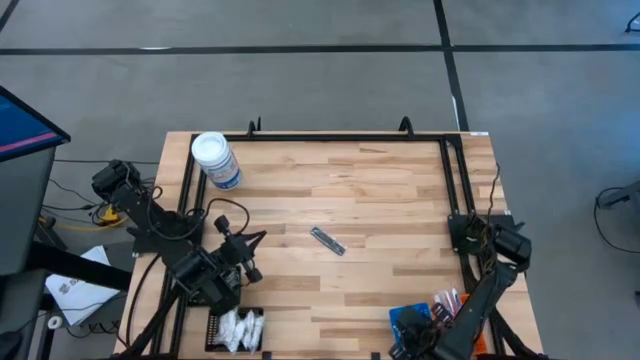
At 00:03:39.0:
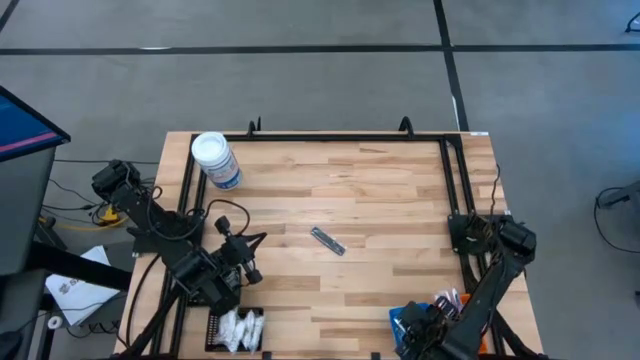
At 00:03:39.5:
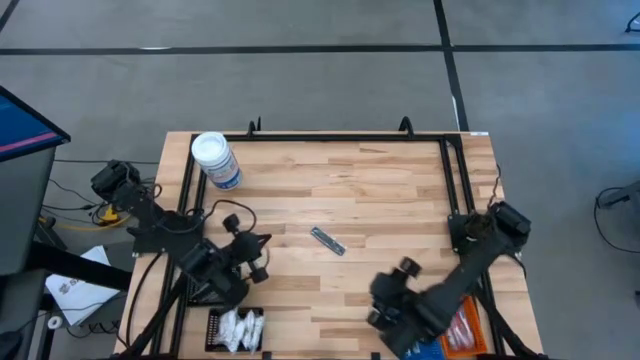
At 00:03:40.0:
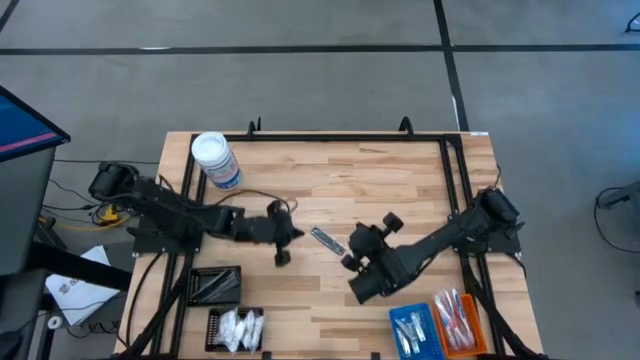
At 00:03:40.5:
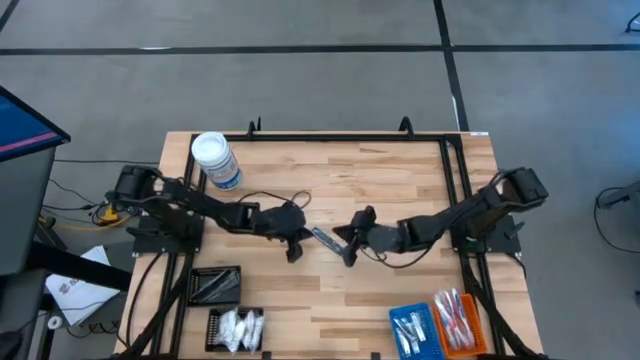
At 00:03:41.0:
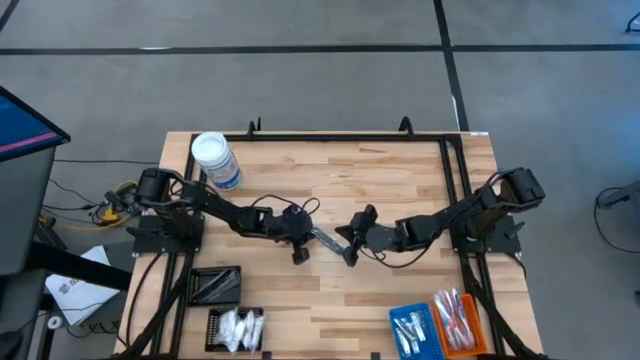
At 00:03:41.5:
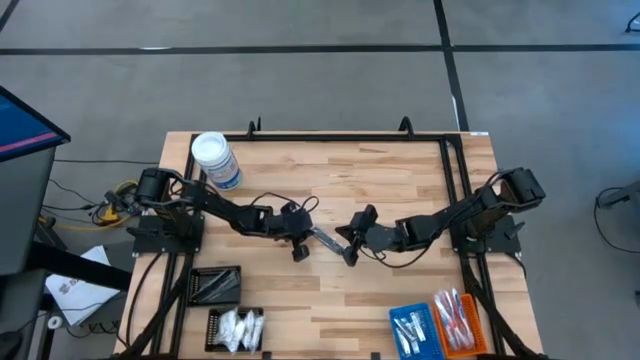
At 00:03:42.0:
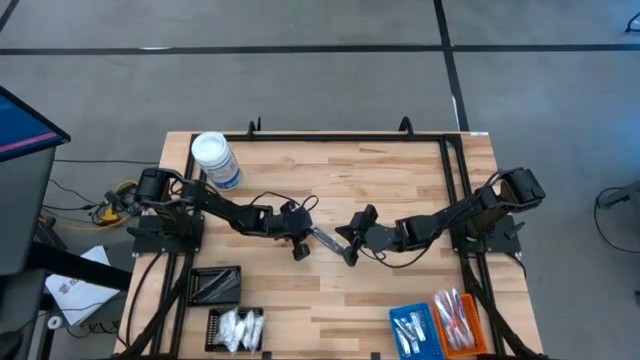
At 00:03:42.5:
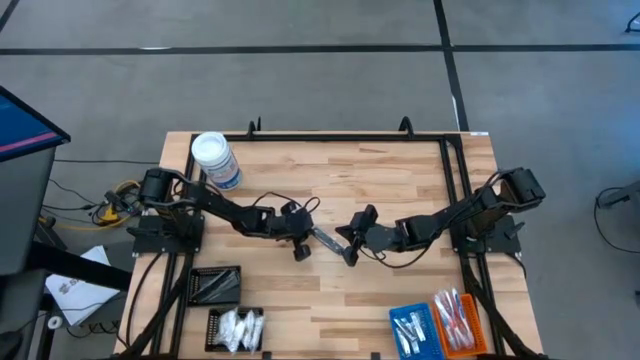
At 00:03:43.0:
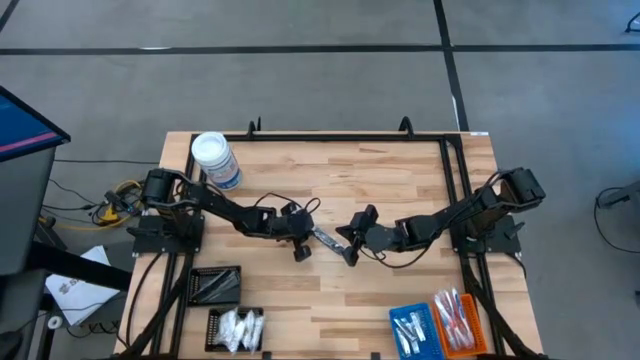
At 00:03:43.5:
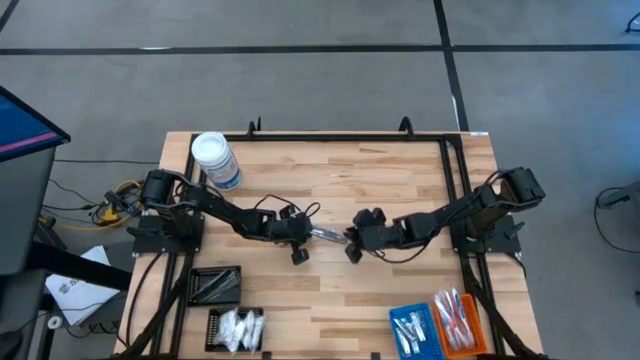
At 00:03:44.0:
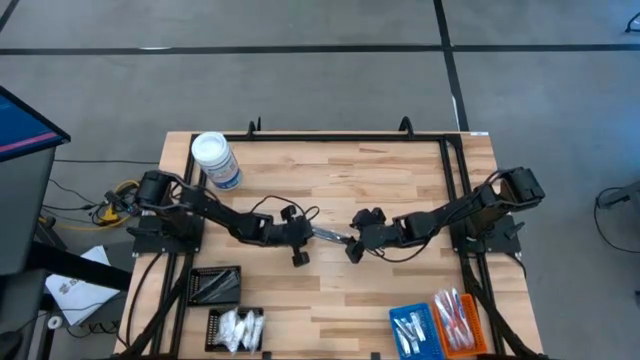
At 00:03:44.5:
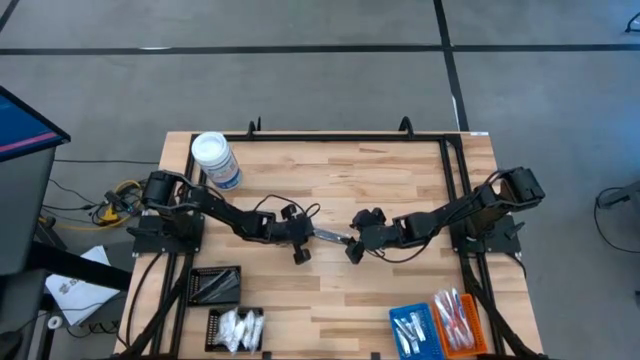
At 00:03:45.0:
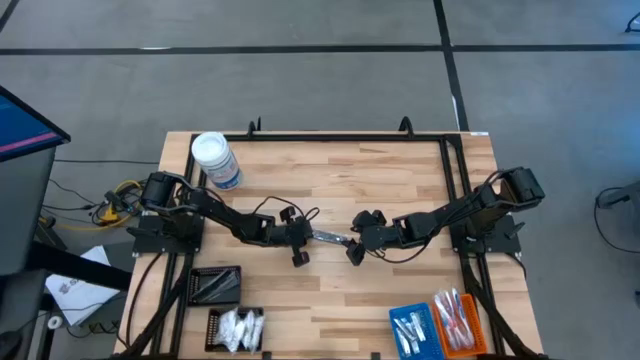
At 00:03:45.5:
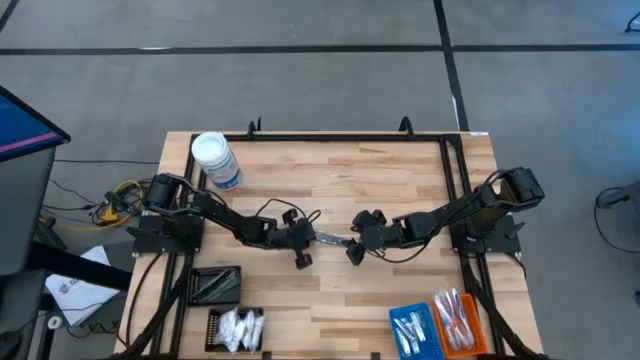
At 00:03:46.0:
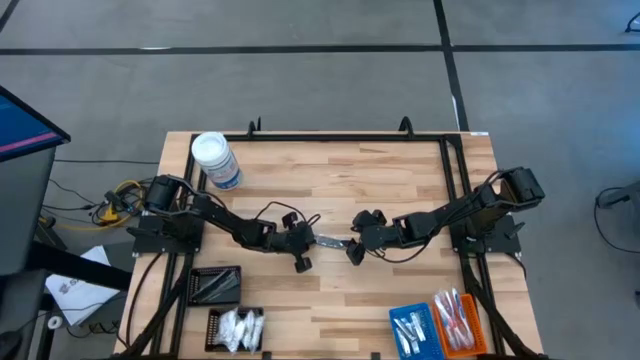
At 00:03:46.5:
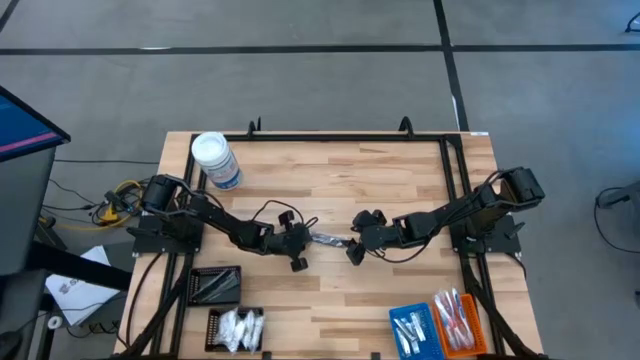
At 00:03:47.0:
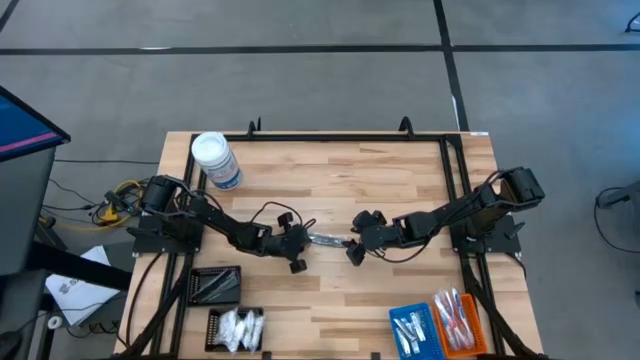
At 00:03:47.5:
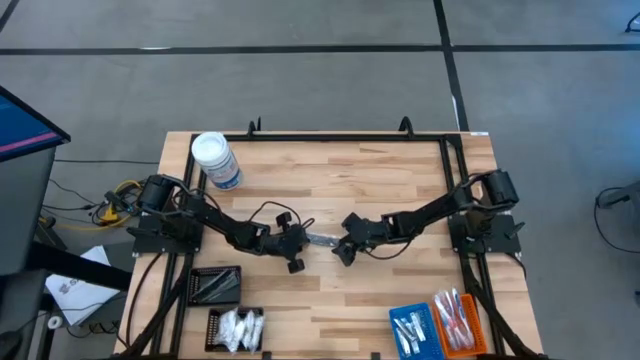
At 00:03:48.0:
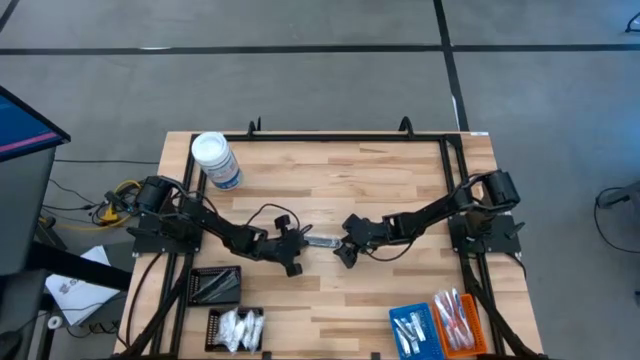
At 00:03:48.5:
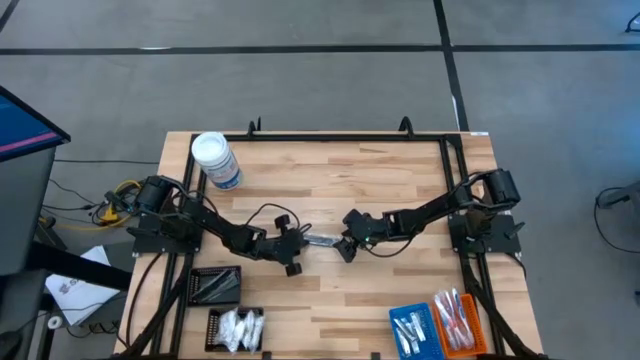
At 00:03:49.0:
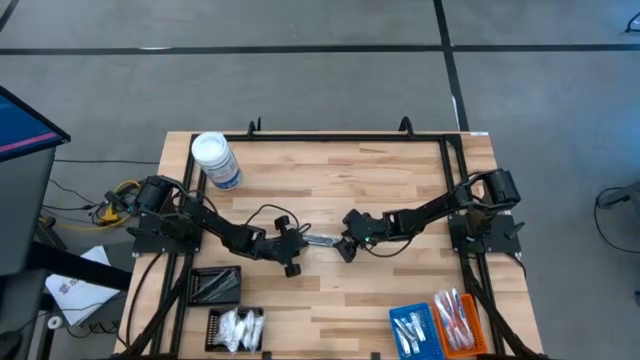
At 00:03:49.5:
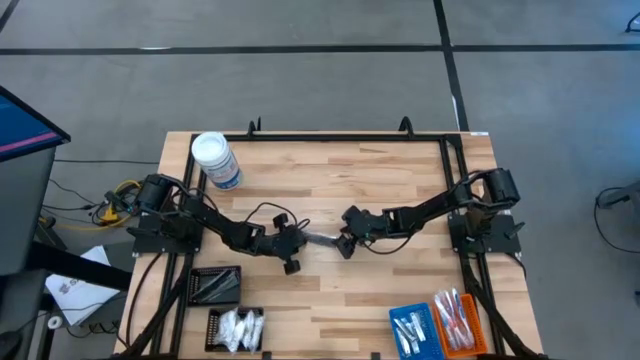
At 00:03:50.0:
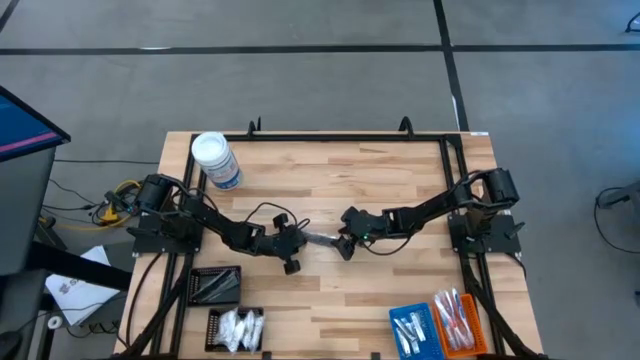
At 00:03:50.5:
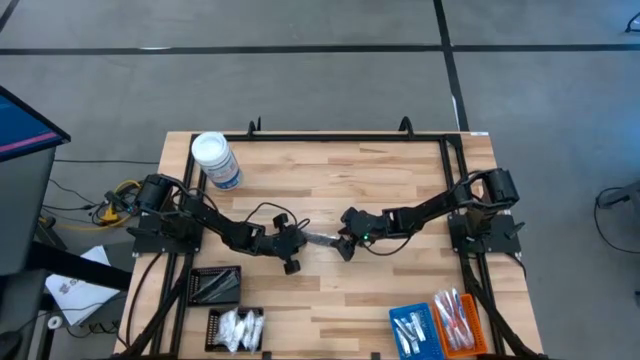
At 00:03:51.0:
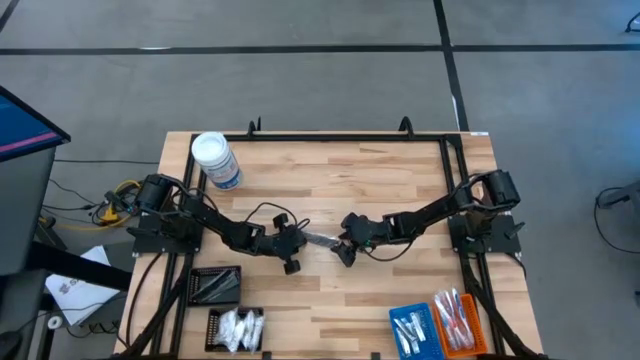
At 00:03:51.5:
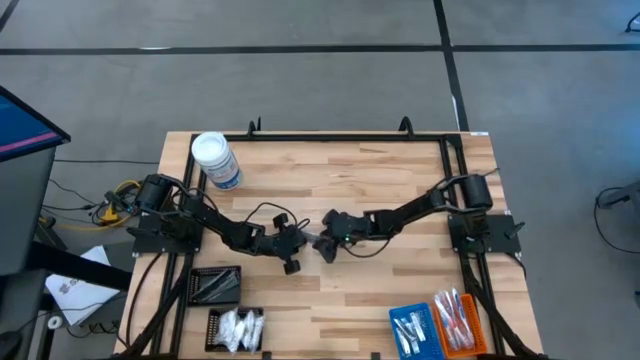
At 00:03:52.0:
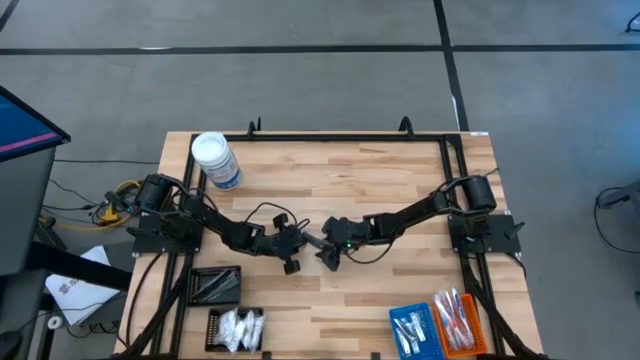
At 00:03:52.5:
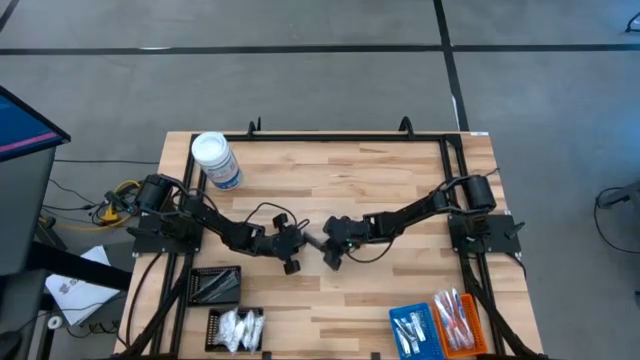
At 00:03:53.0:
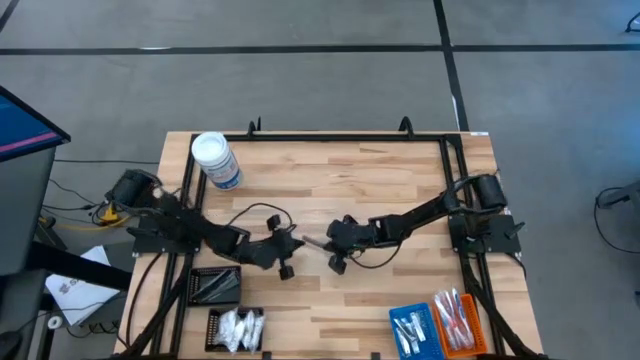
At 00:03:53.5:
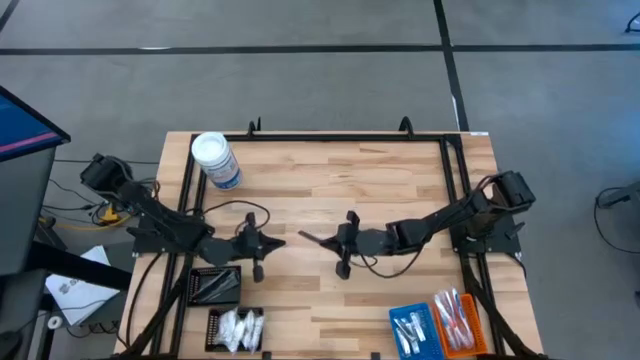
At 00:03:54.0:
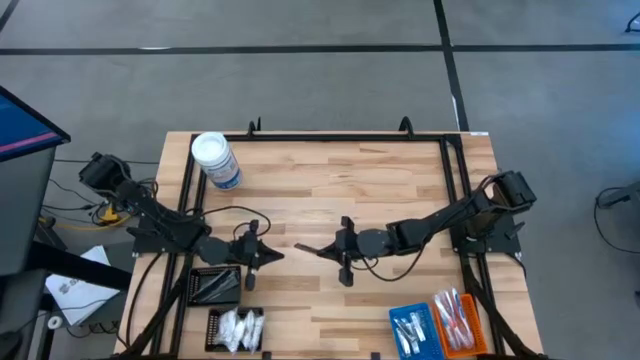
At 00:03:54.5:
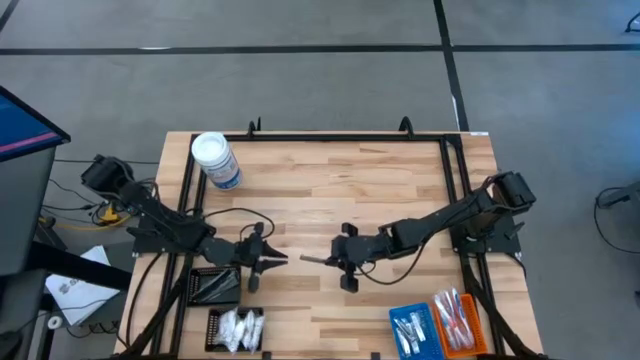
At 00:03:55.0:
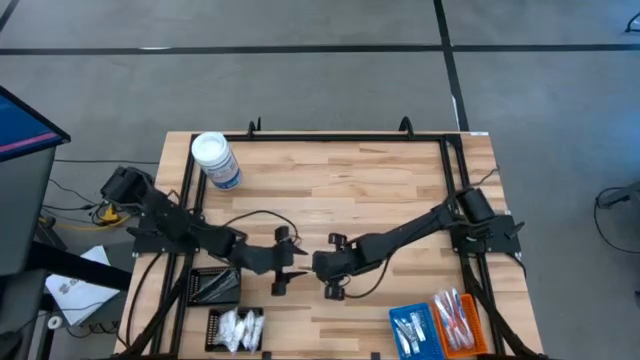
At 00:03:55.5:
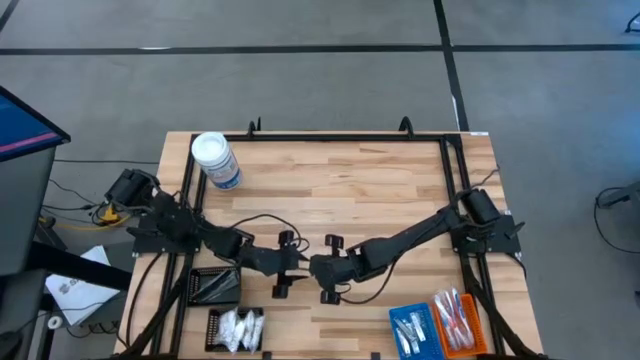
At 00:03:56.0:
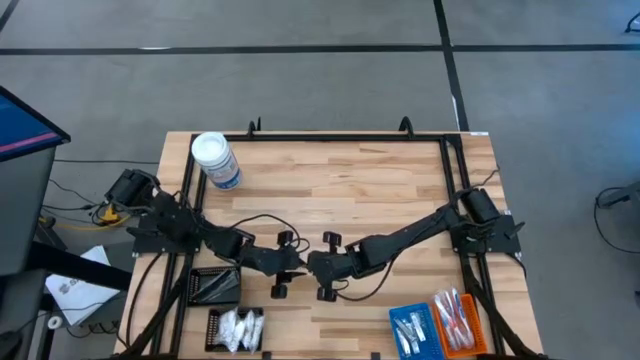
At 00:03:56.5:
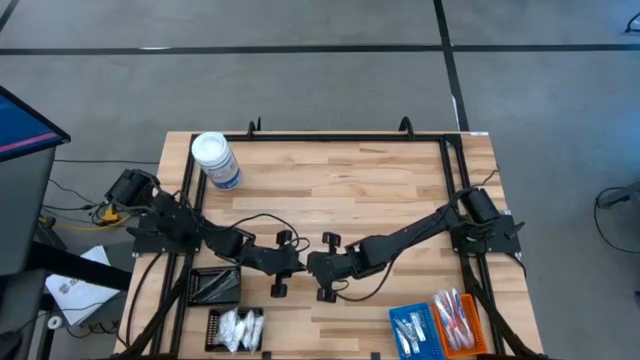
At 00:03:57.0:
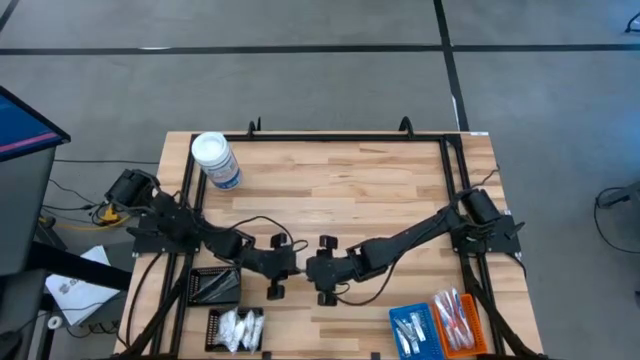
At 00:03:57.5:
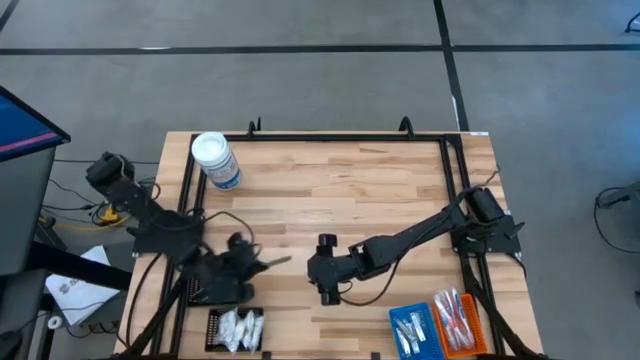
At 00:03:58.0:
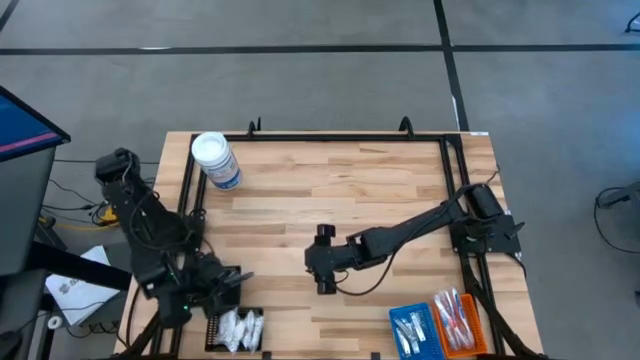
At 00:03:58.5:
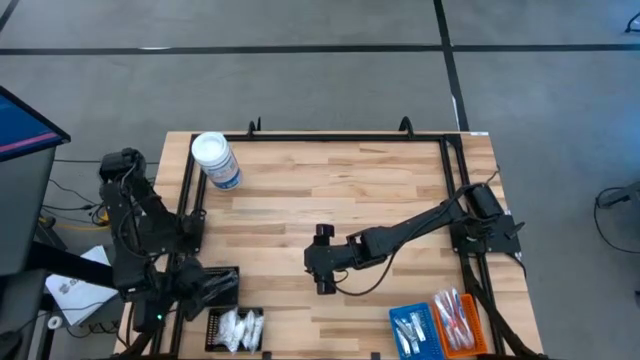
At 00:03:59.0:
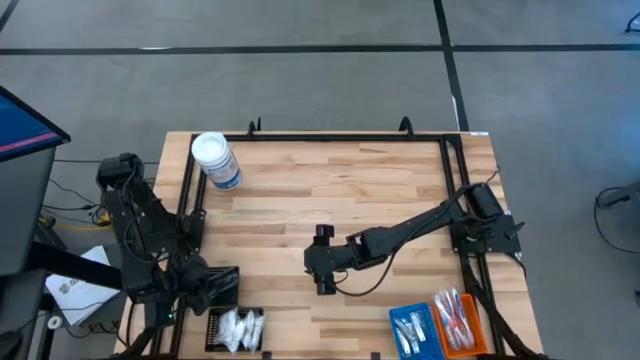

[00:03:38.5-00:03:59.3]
Task: Pick & Place Travel size toiletries
Put the black comb into the top black bin
